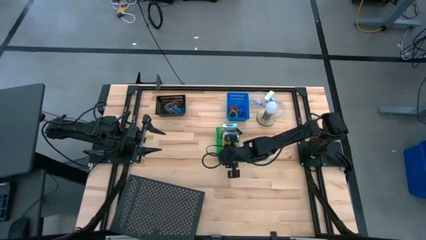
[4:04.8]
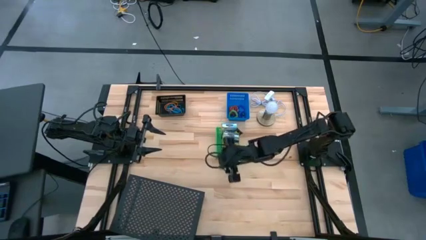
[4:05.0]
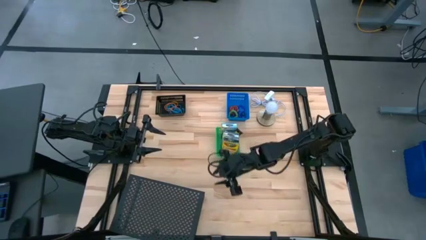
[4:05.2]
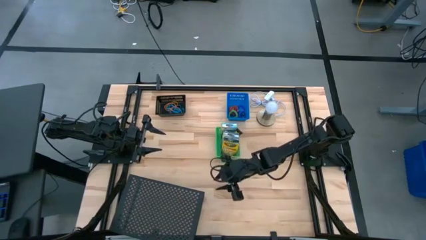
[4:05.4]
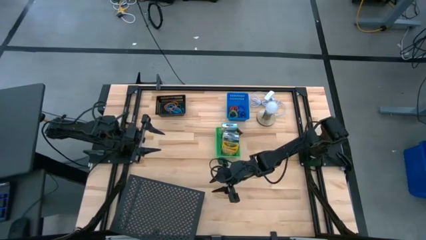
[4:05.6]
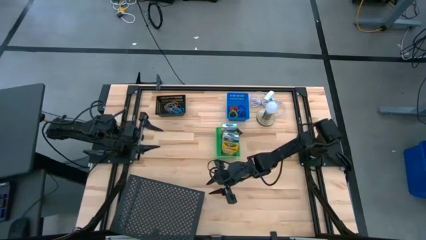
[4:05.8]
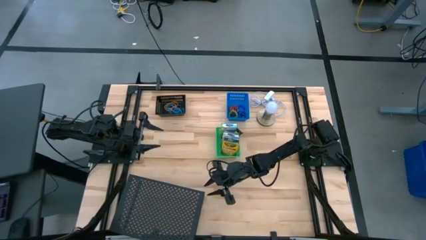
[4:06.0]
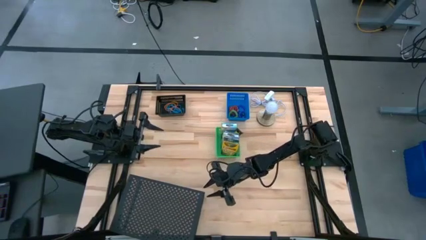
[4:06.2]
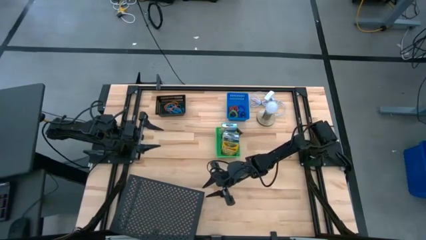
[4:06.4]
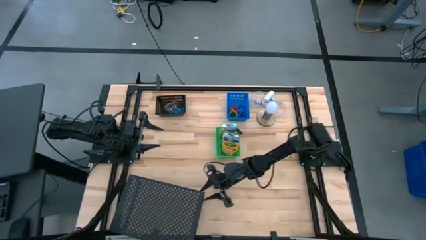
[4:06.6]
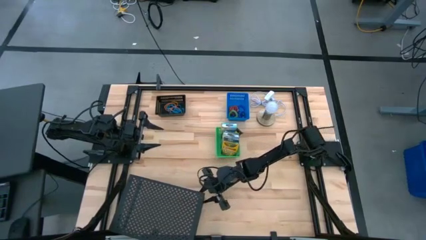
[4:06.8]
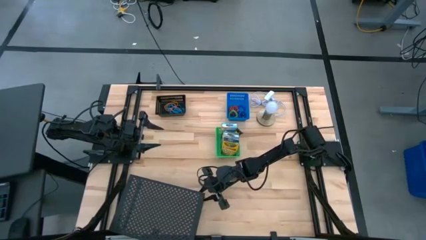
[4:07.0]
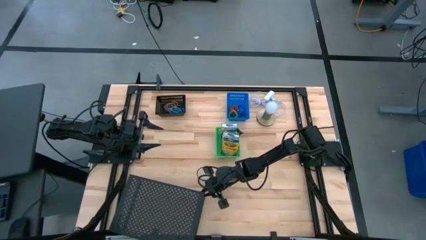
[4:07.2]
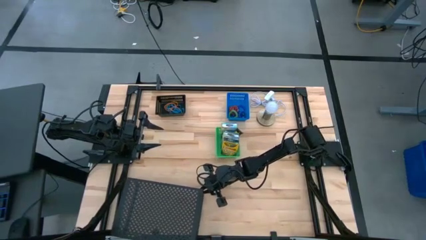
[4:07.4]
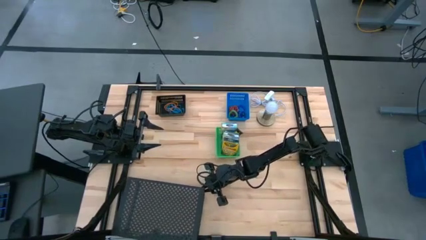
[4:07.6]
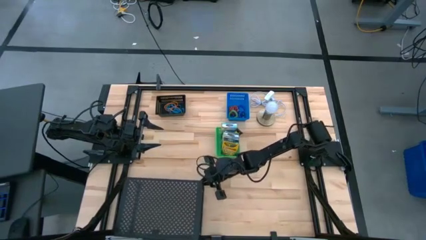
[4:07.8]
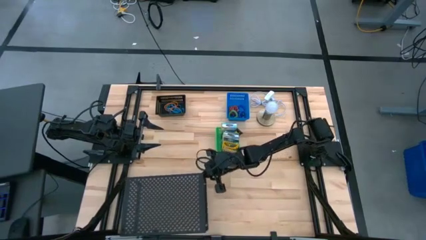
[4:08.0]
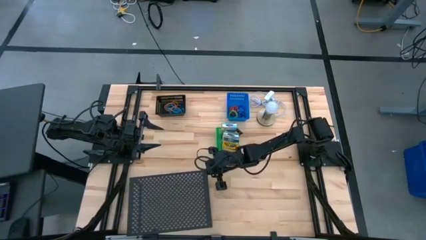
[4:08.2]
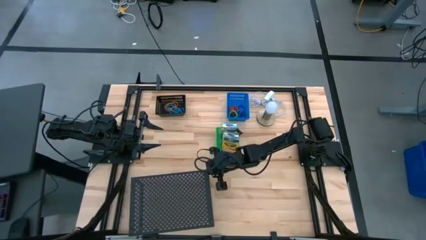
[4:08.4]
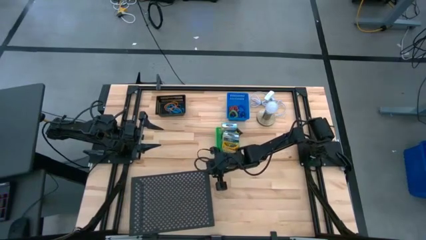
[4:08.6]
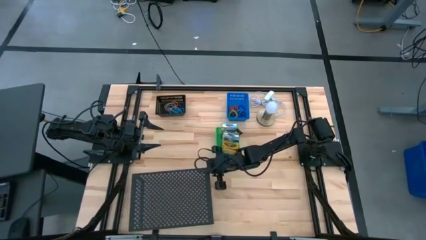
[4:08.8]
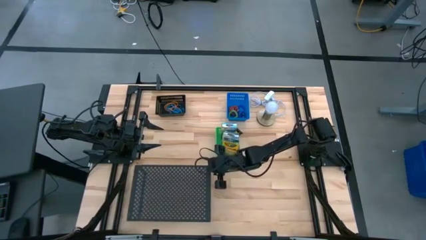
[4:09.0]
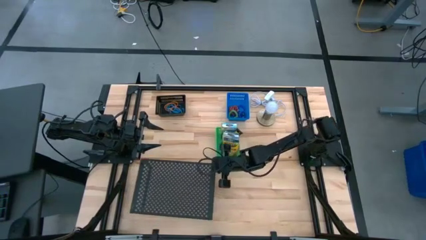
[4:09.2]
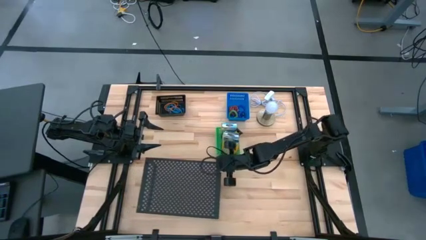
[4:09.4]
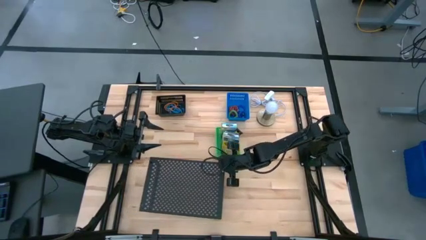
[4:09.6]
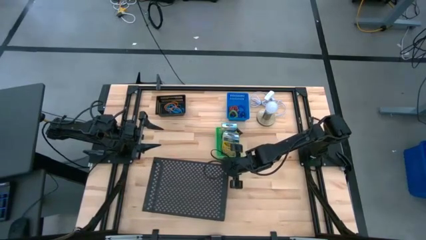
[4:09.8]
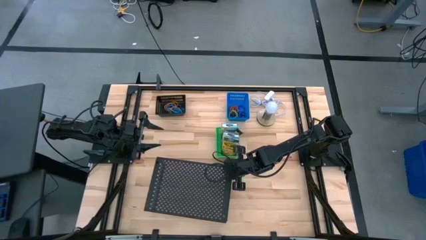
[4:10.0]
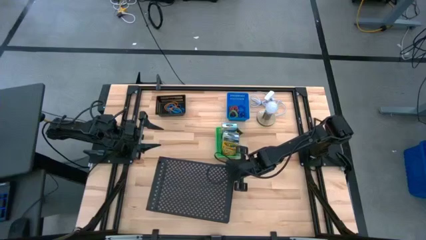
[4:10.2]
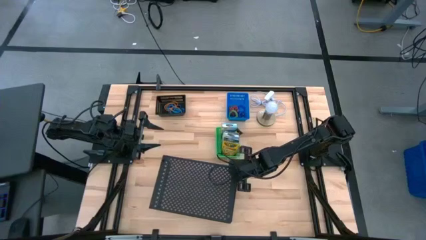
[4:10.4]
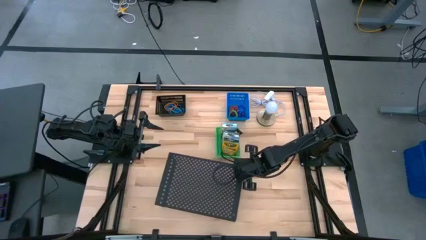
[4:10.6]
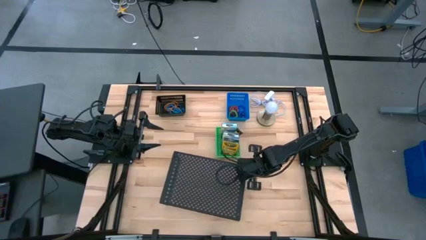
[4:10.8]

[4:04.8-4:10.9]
Task: Pick & Place Office Desk Supplies
Move the shelf to the center of the table

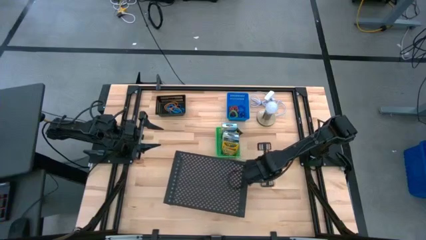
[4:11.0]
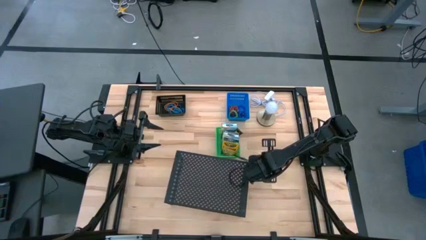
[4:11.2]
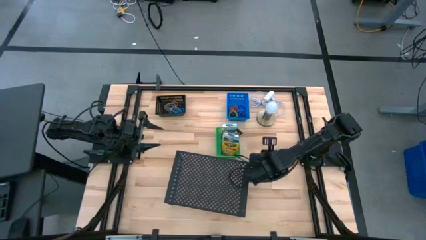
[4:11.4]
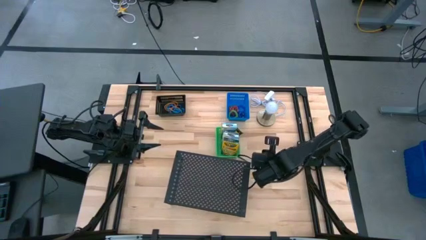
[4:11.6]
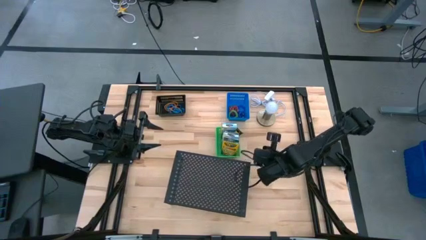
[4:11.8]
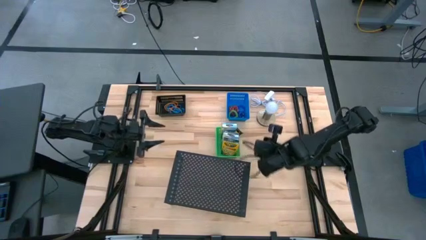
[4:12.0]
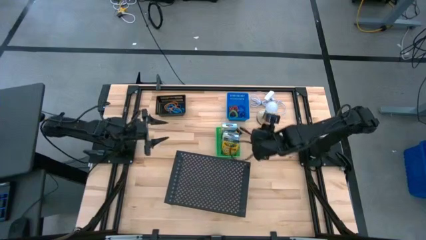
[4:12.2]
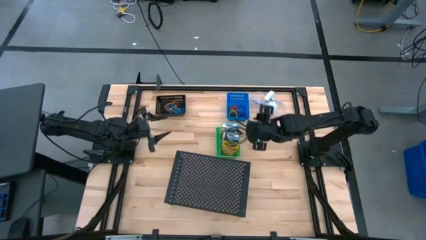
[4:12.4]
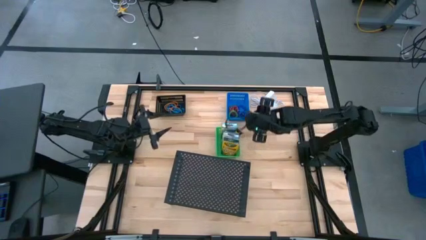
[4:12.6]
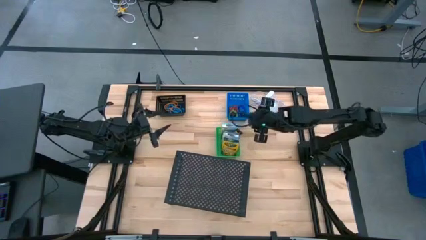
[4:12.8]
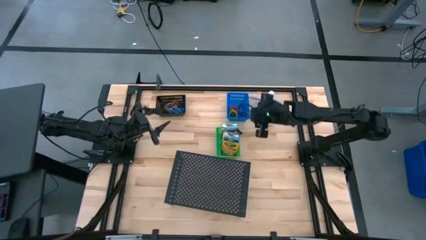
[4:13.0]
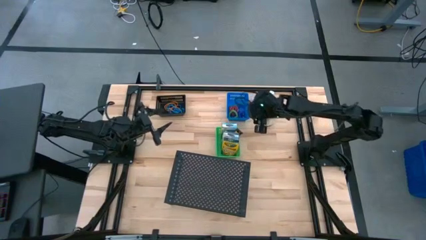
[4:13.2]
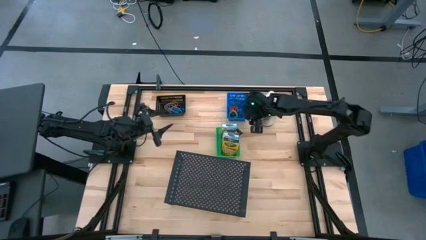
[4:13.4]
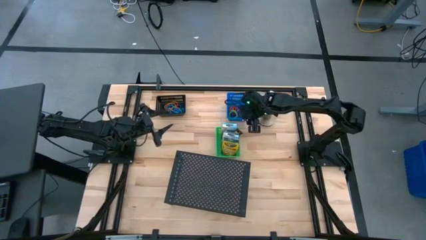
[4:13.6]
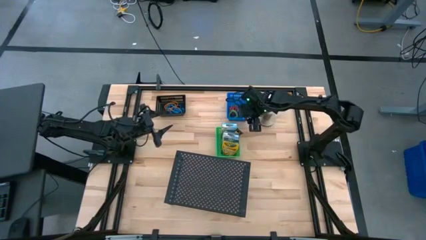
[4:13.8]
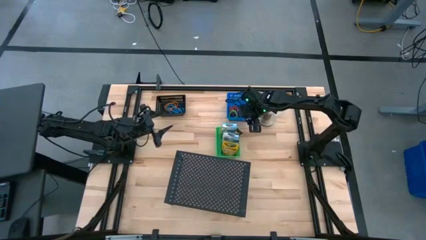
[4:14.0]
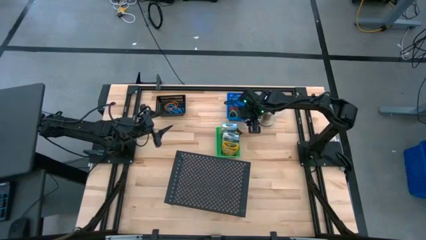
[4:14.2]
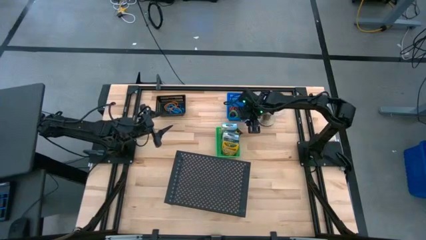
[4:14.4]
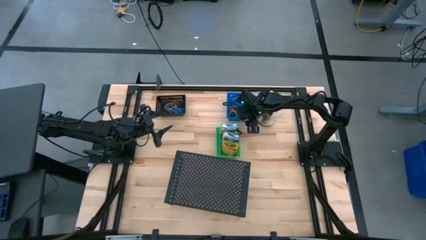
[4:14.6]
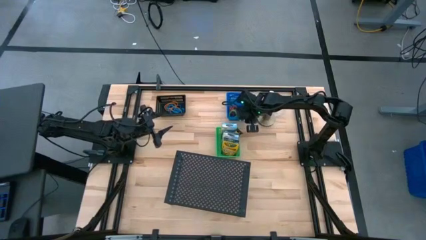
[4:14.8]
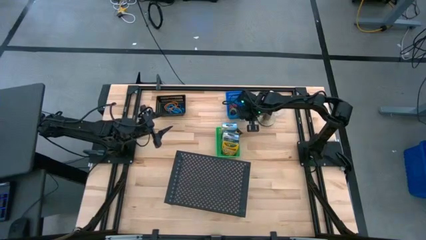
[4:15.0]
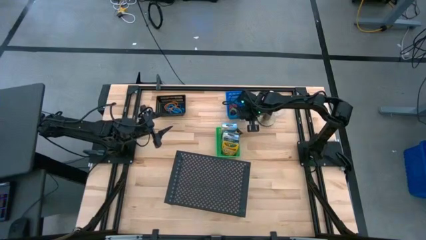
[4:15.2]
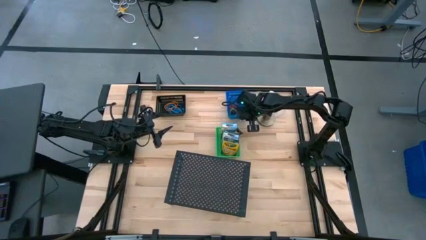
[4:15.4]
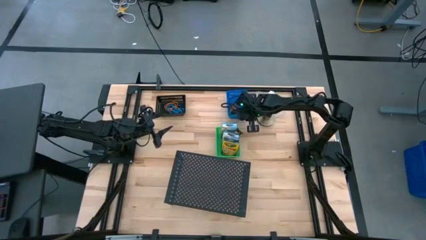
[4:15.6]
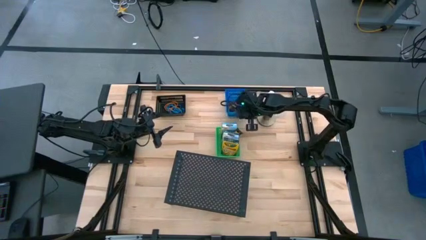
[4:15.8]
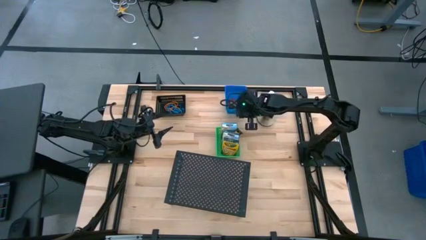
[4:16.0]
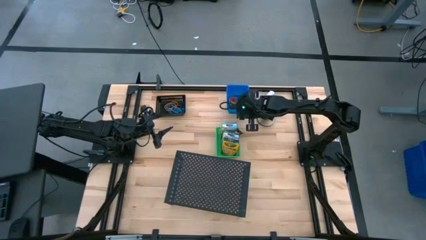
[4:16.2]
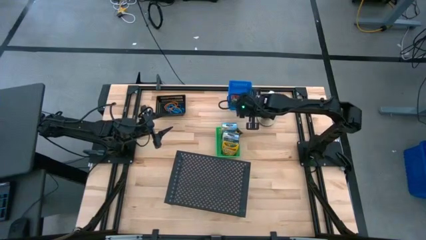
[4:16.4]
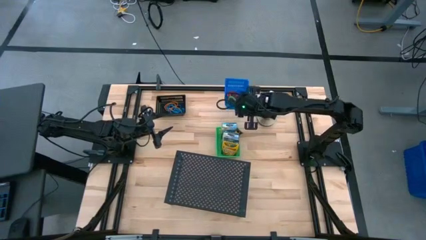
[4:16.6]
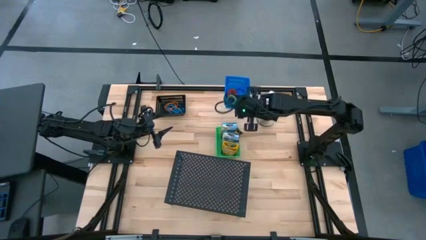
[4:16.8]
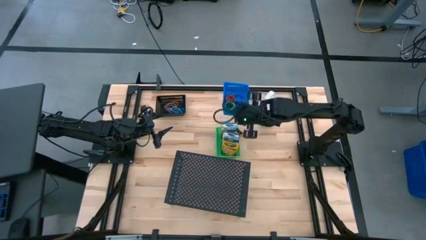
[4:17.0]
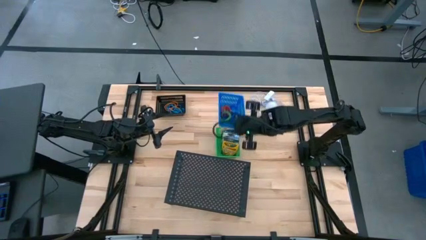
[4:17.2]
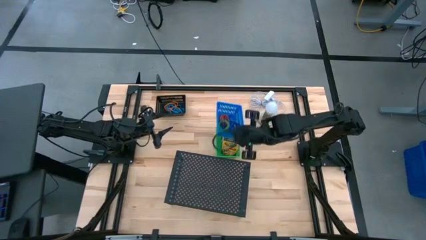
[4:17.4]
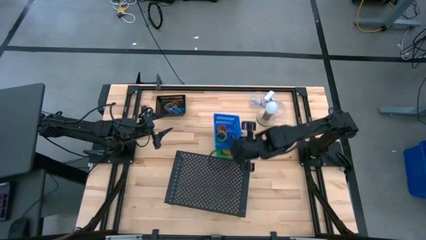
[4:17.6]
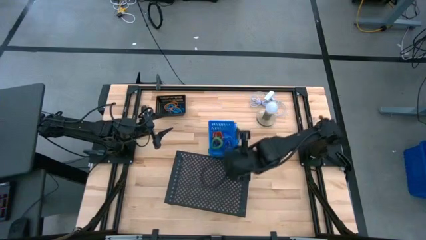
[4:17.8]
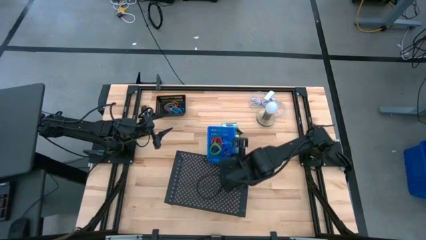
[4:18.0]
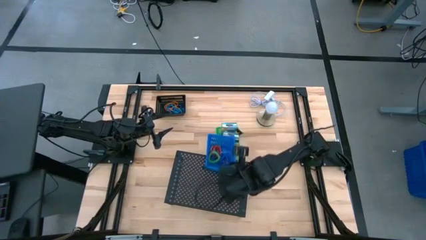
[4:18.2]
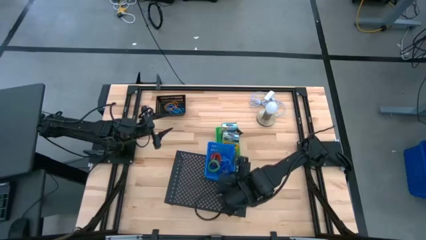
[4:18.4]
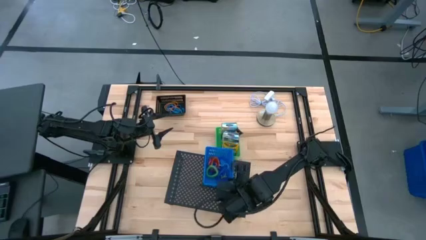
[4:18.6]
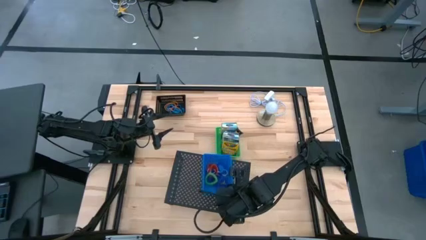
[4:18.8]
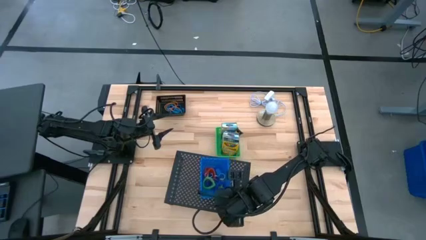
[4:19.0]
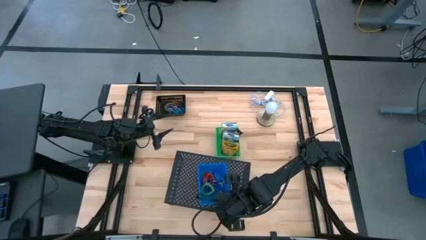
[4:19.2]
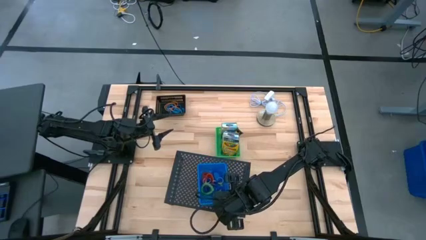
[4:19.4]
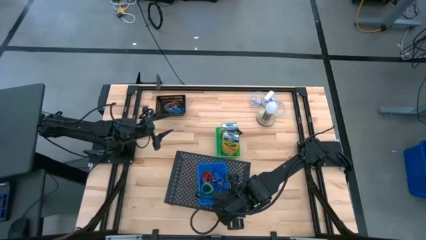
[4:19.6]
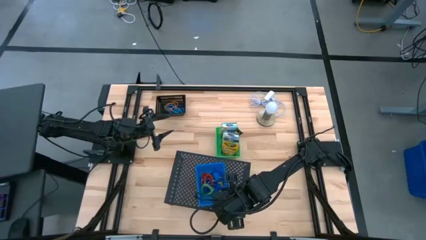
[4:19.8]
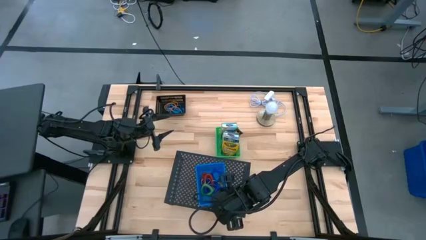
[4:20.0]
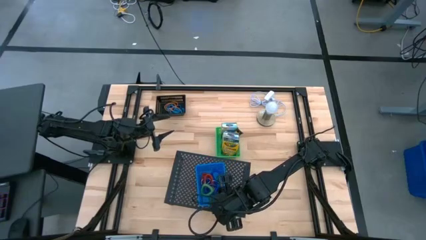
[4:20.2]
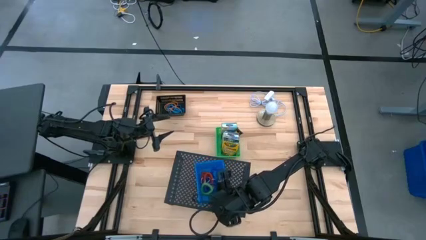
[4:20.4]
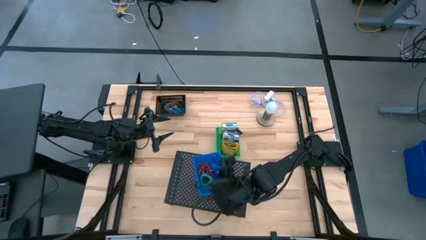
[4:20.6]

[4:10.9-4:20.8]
Put the blue bin with the spring keychains on the shelf
